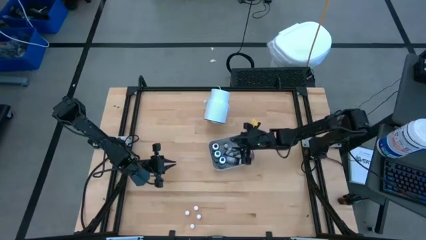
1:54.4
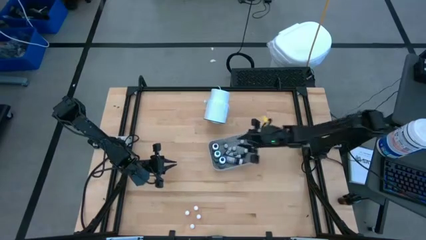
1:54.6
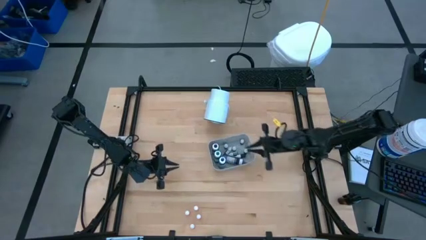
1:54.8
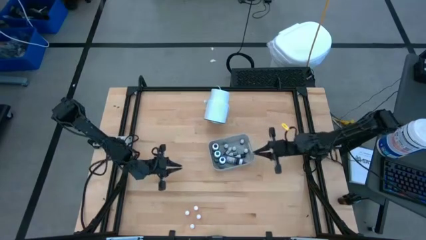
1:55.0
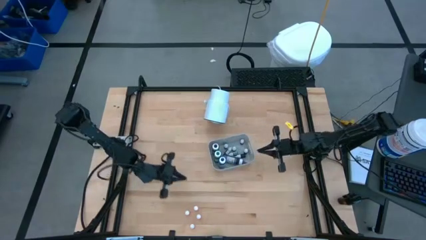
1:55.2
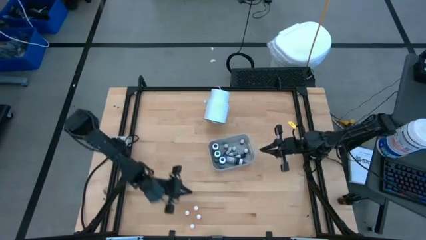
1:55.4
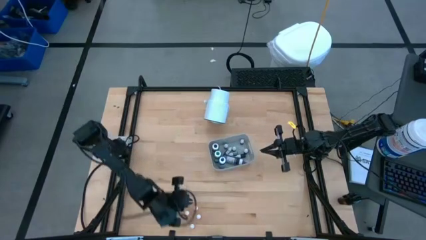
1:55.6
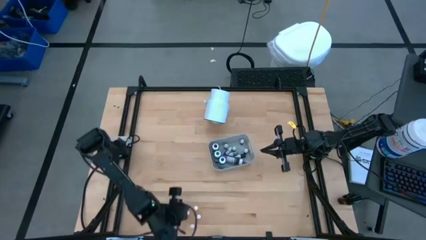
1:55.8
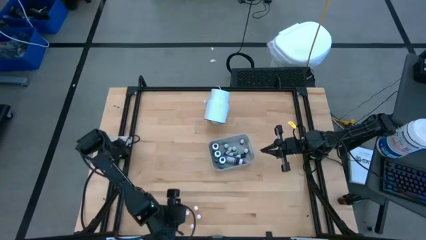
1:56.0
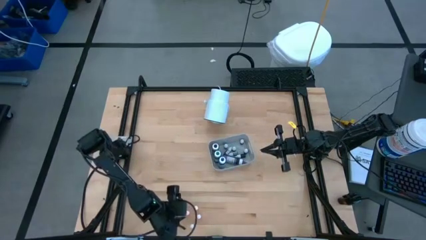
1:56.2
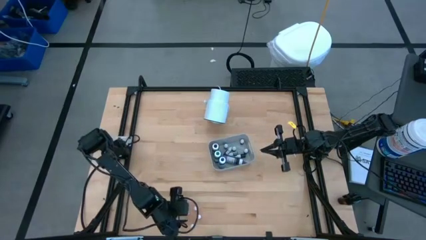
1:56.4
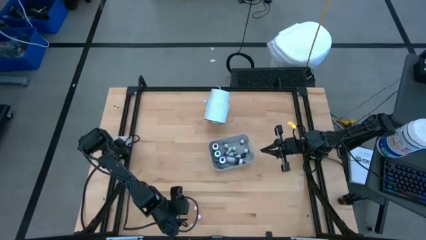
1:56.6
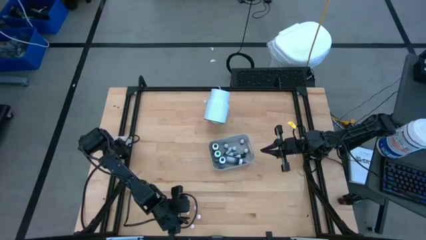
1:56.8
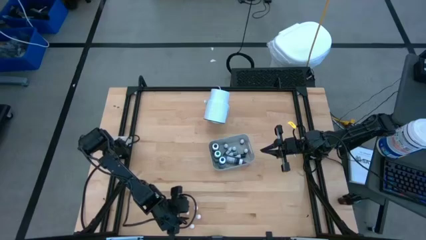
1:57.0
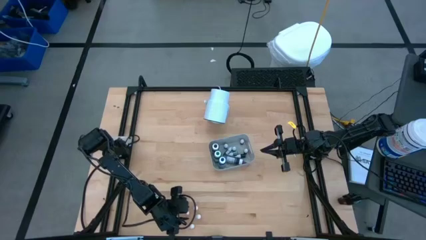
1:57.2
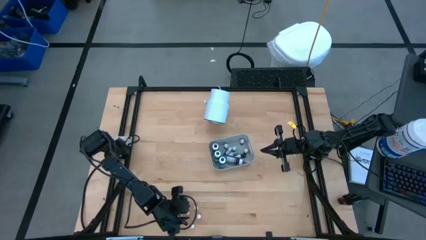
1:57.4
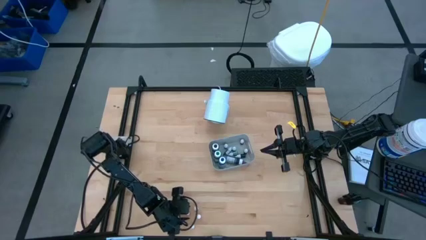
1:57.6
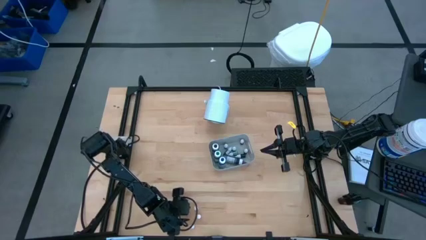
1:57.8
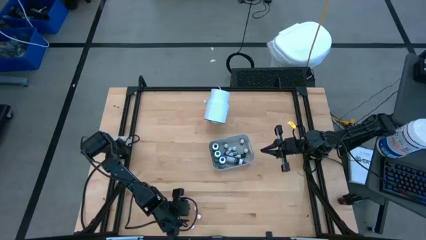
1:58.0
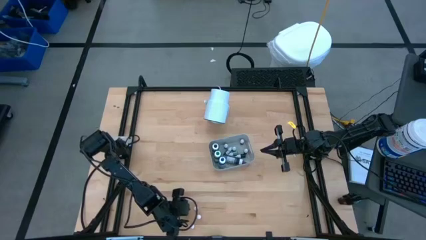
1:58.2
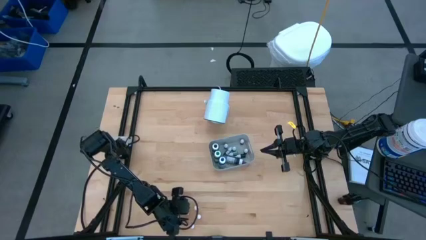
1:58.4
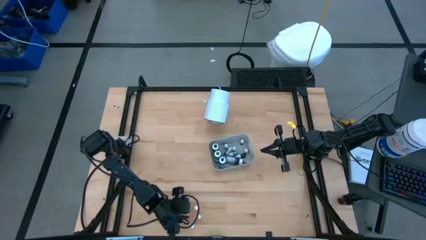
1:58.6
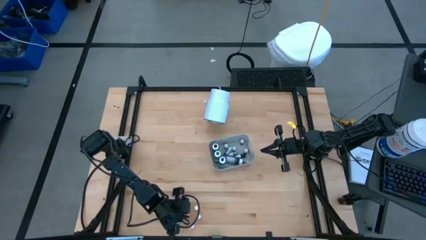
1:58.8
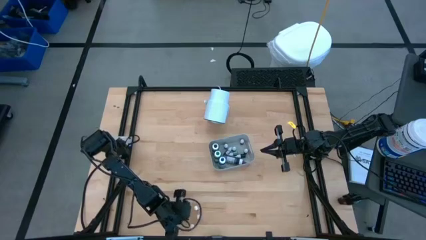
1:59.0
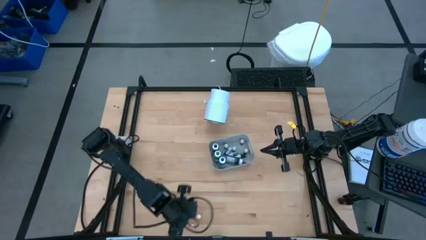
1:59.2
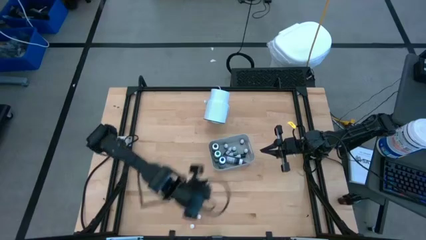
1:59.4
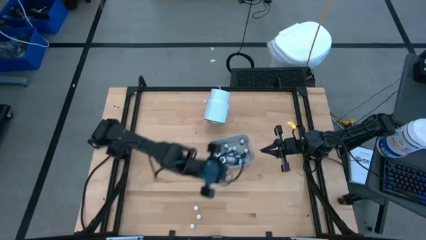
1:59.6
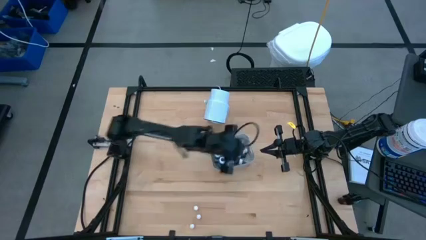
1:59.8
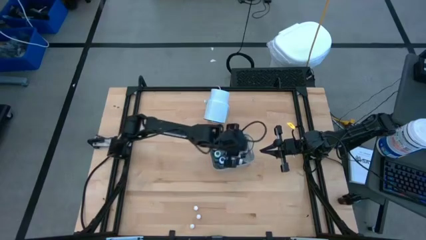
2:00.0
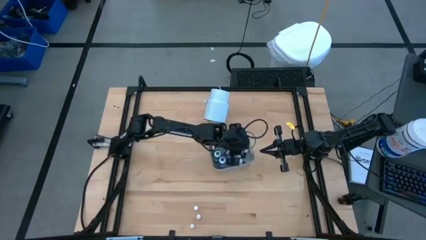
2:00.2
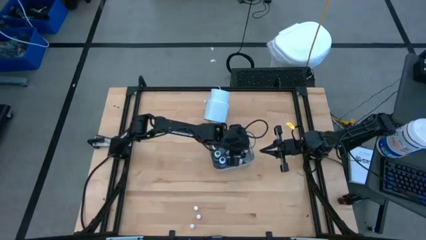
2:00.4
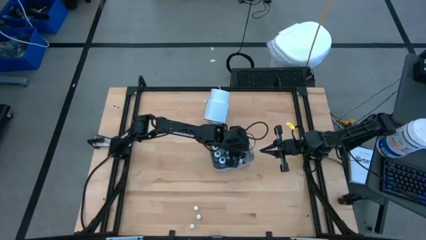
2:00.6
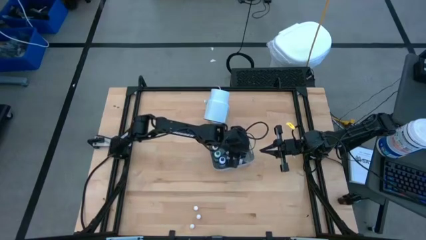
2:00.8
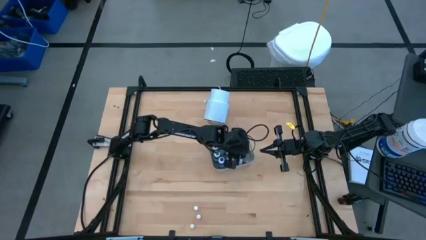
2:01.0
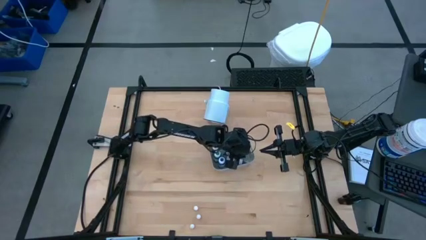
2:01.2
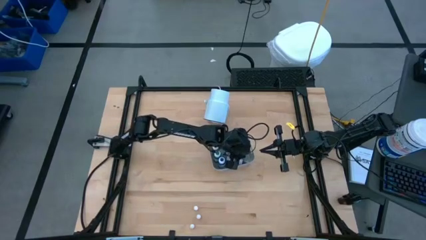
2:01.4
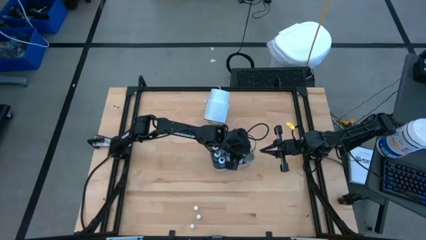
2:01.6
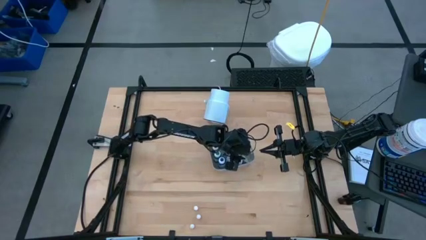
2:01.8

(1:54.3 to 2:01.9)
Task: Pick & Place food coloring
Put the small orange food coloring bottle into the gray bin

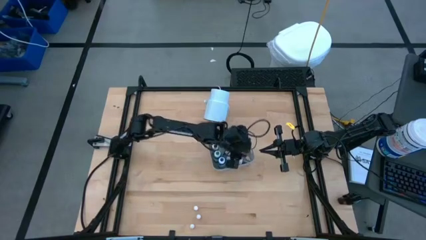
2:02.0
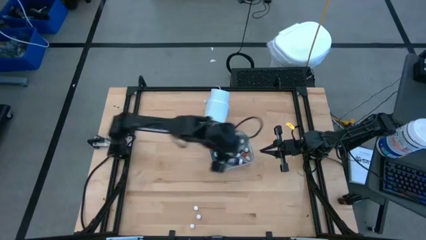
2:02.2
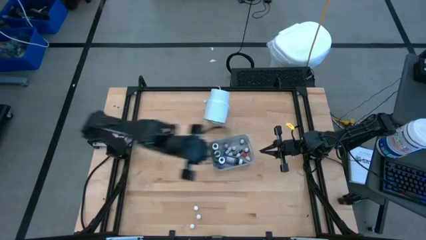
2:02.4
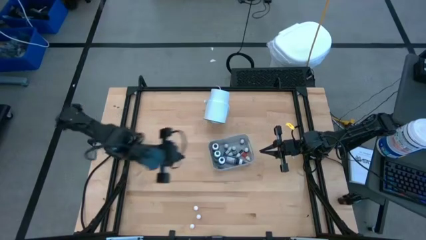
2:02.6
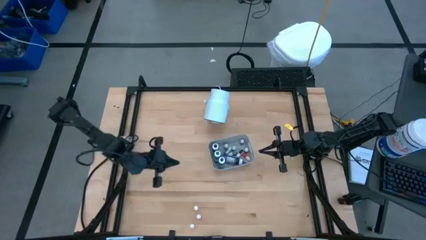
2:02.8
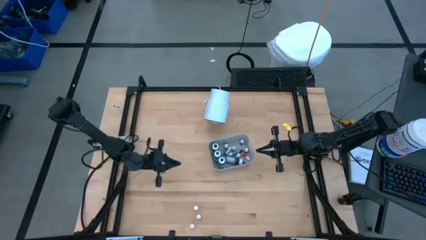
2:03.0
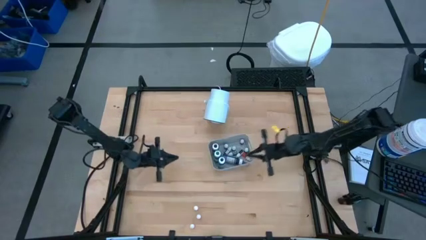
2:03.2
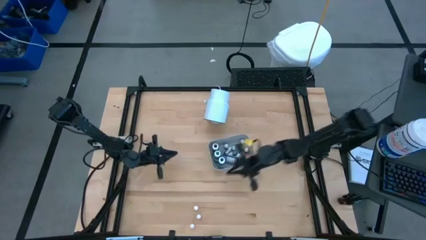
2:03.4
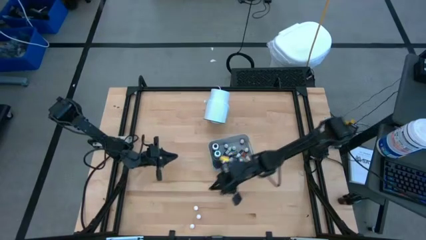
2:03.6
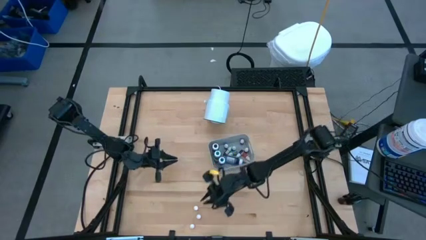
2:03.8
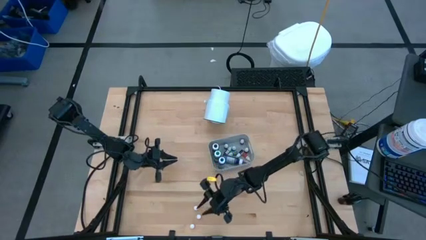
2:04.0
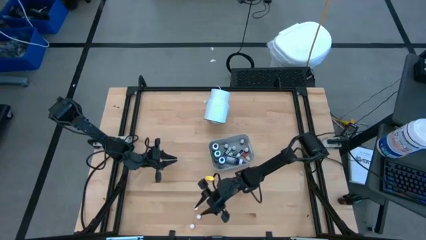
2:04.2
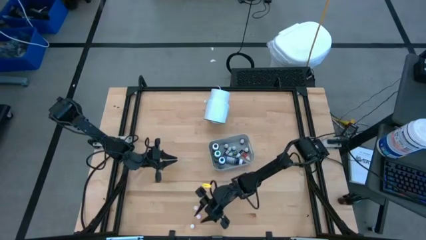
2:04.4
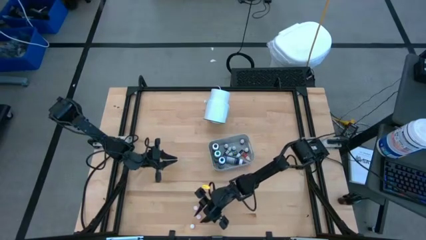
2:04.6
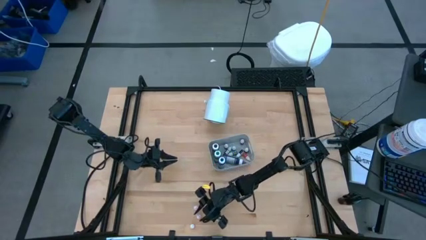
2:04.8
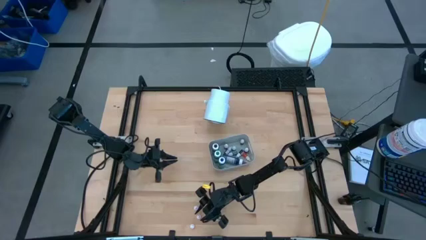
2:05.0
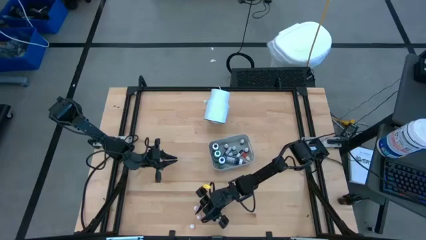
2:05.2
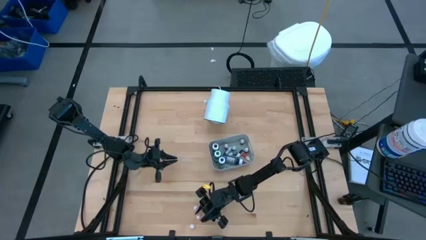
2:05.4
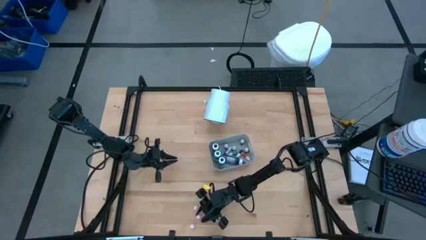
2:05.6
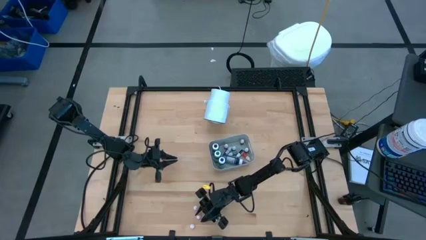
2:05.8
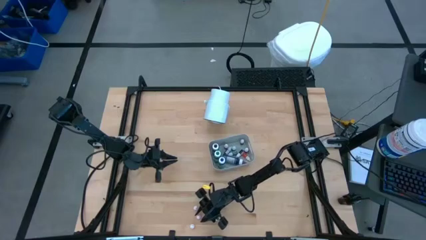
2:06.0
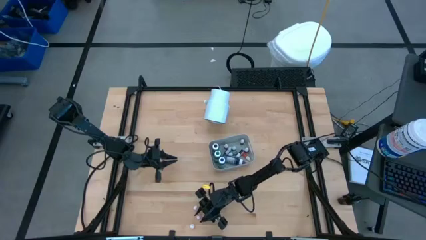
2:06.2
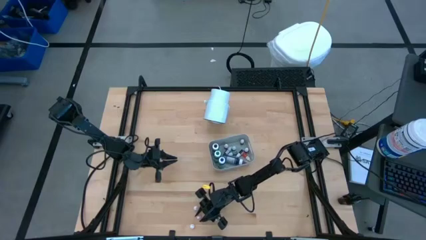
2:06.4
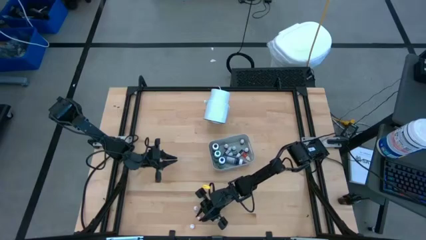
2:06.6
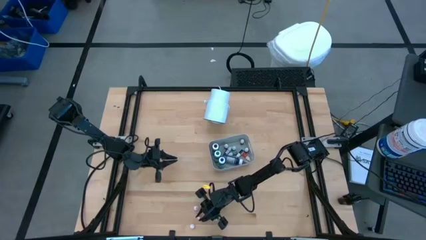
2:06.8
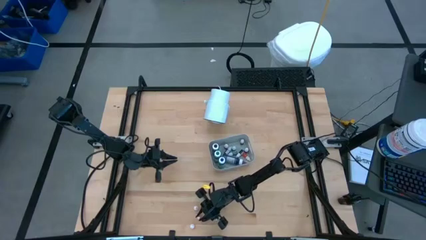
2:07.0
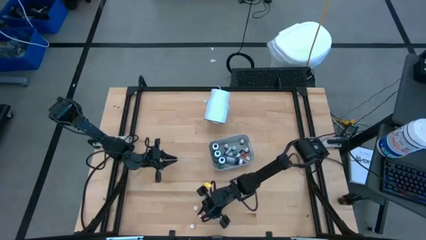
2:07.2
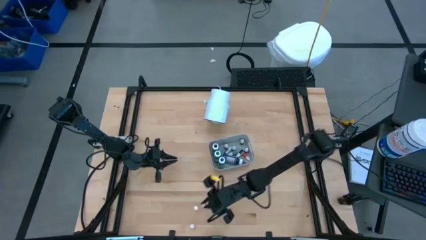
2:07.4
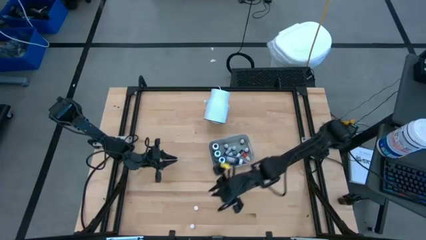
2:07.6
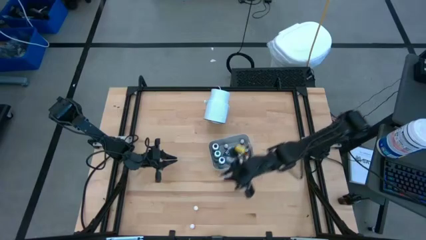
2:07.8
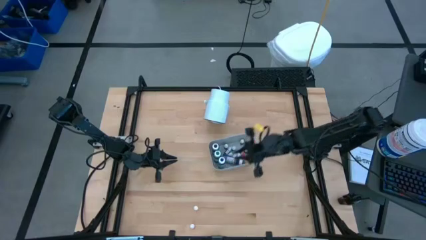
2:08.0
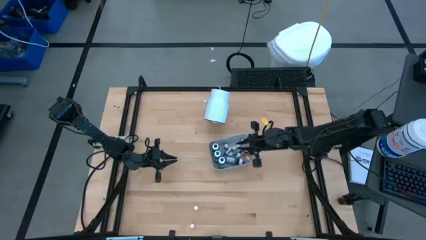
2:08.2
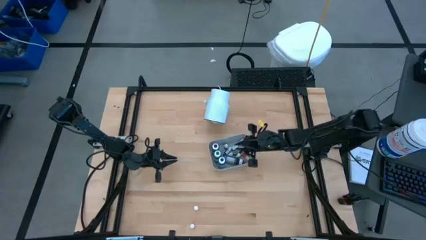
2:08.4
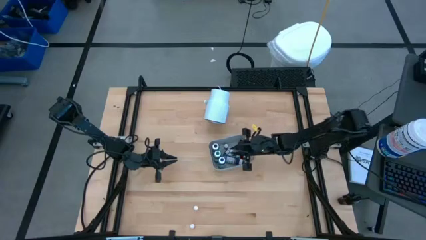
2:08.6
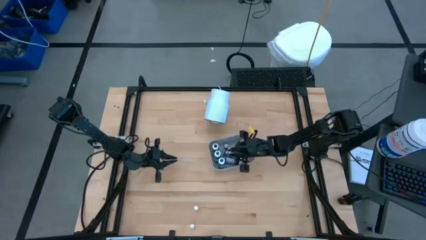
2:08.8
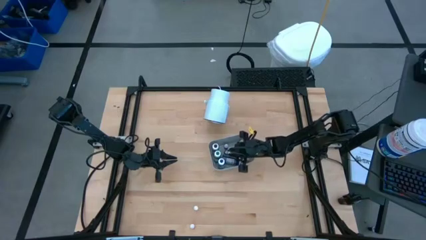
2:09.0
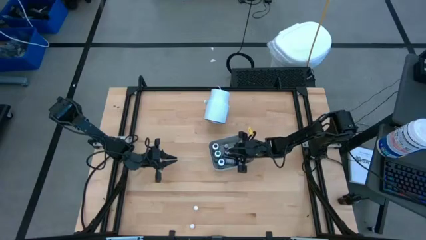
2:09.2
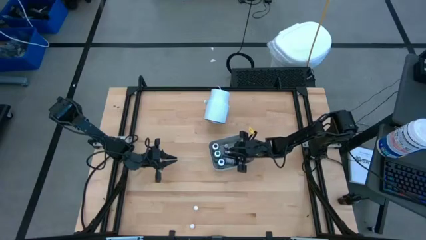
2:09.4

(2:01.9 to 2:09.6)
Put the small orange food coloring bottle into the gray bin
